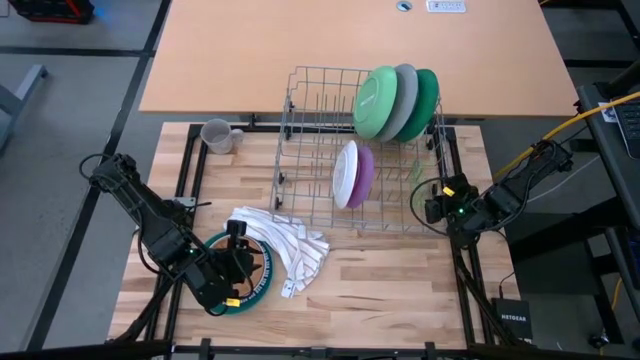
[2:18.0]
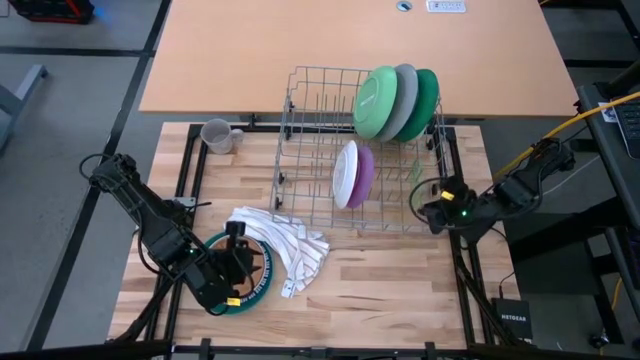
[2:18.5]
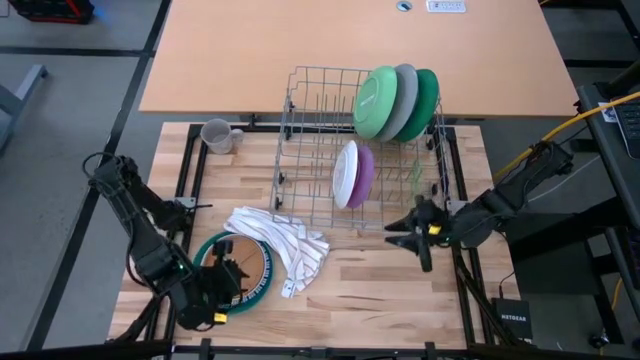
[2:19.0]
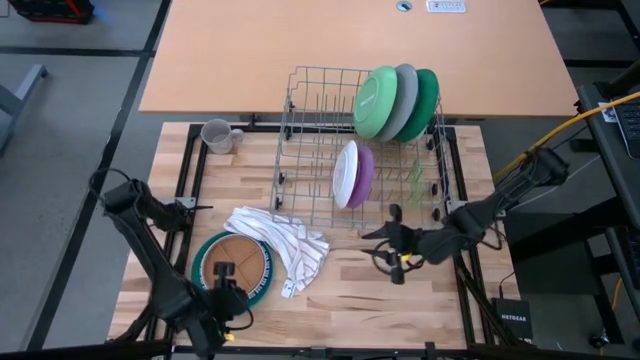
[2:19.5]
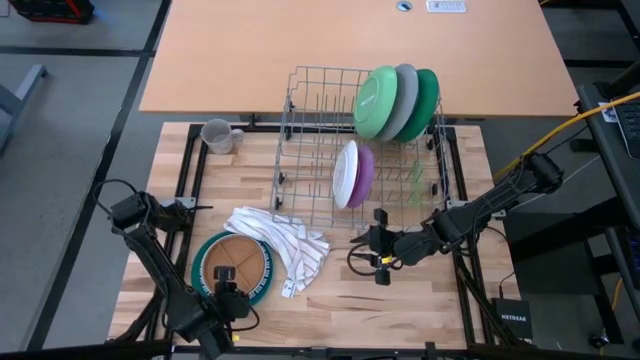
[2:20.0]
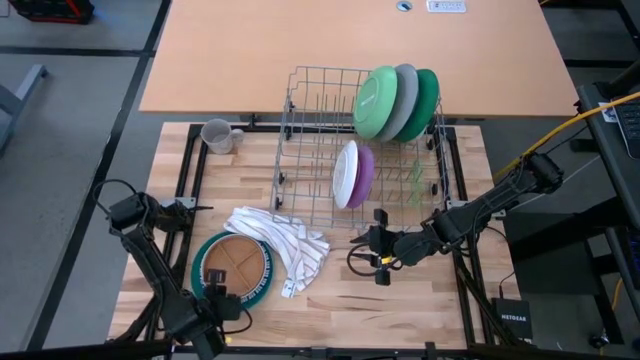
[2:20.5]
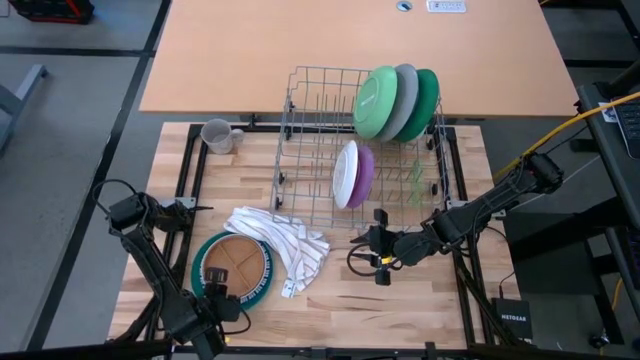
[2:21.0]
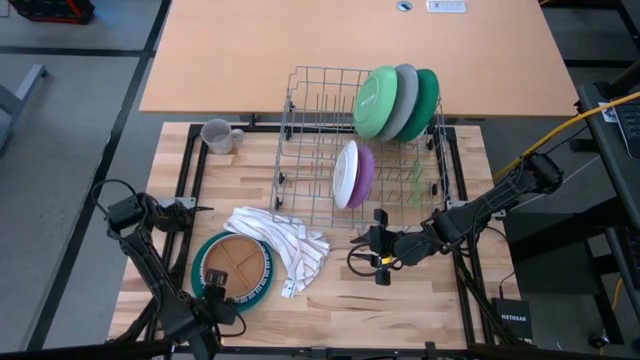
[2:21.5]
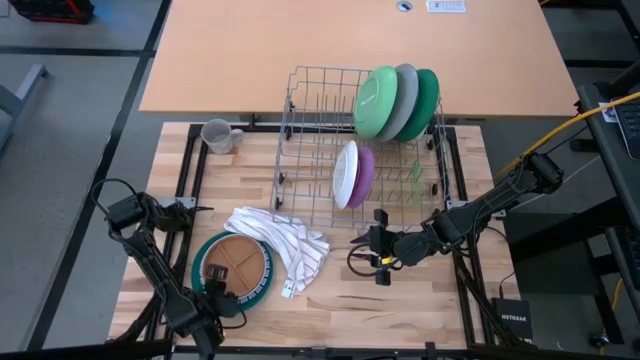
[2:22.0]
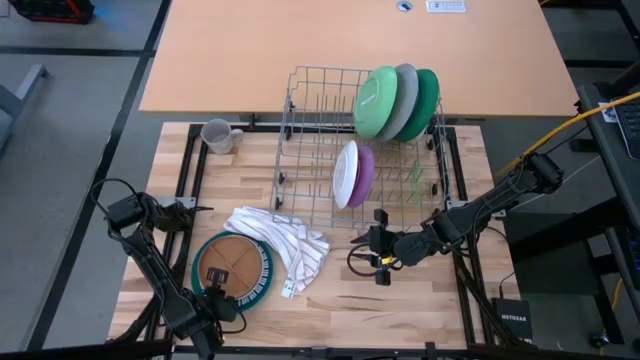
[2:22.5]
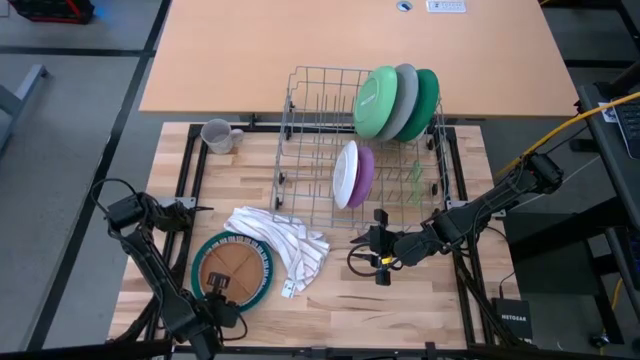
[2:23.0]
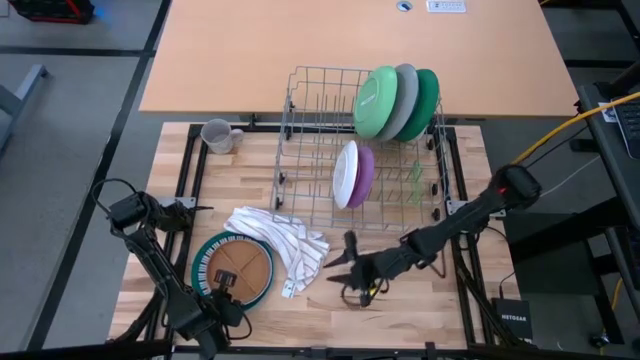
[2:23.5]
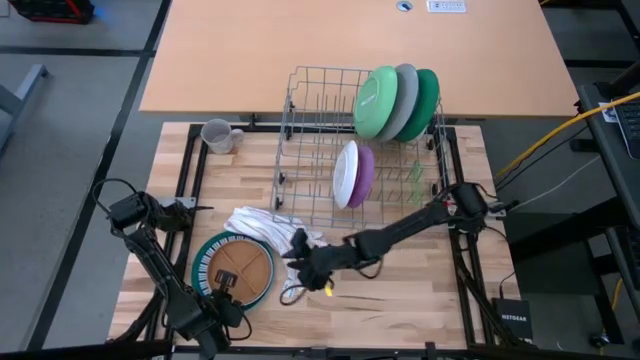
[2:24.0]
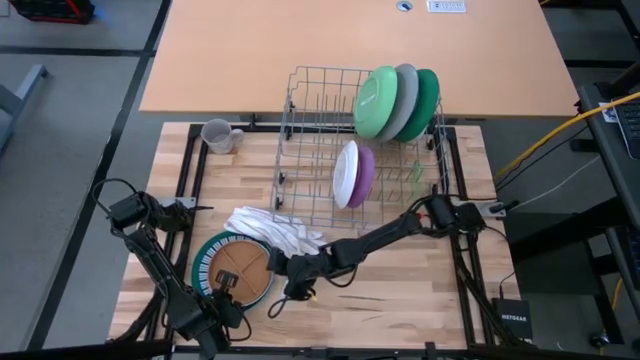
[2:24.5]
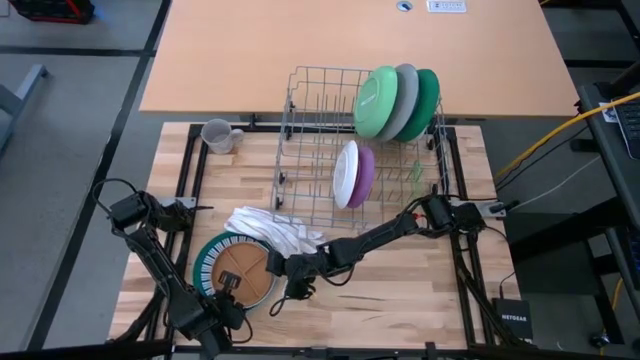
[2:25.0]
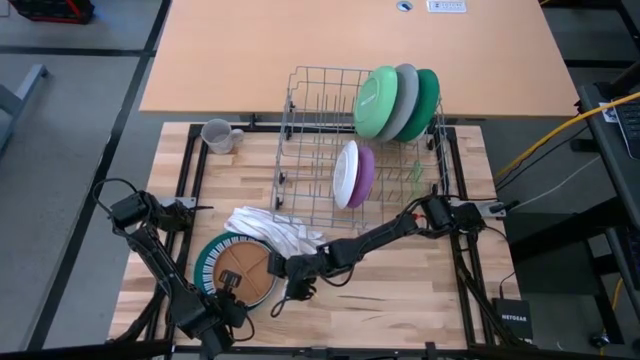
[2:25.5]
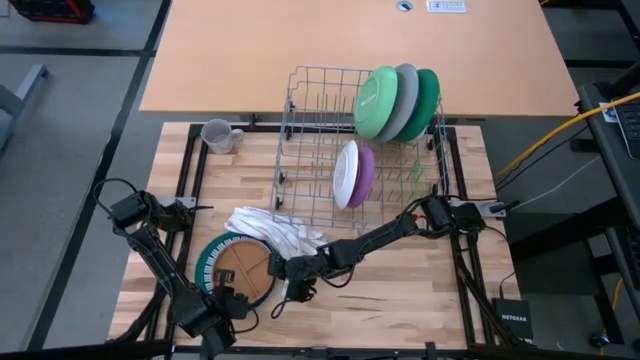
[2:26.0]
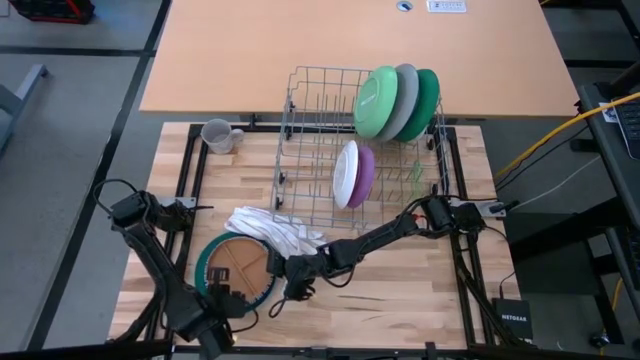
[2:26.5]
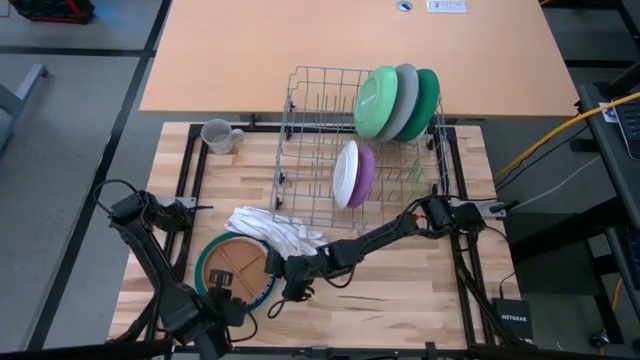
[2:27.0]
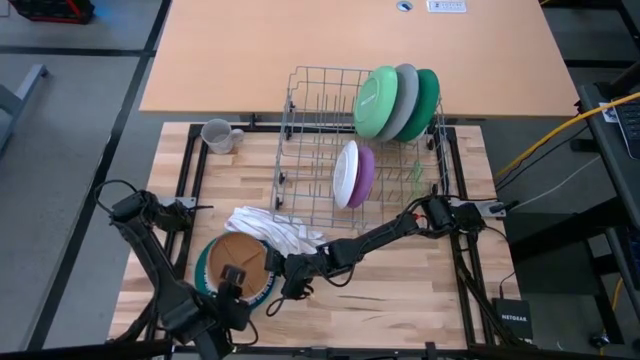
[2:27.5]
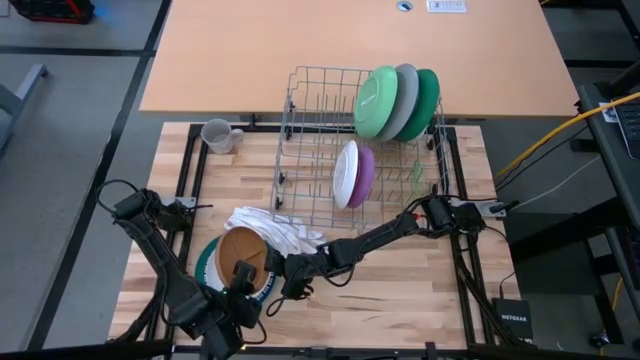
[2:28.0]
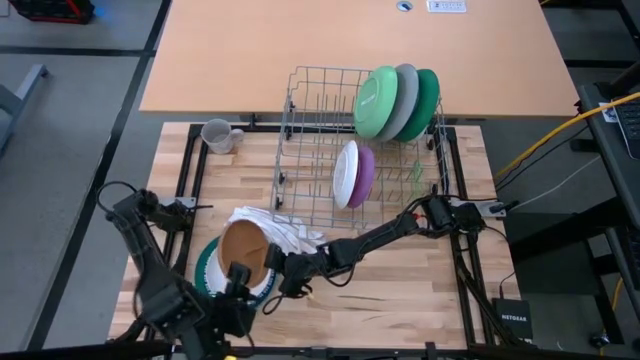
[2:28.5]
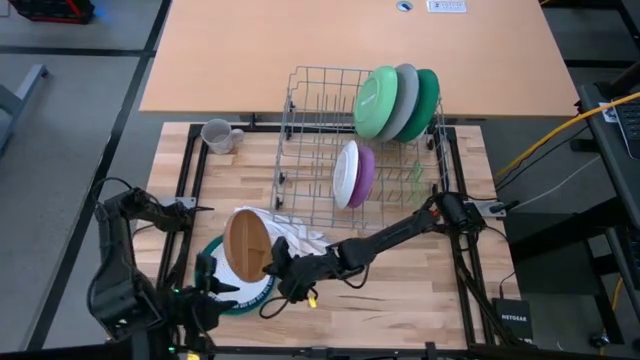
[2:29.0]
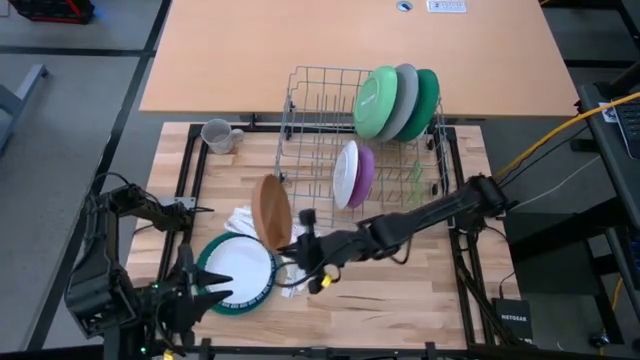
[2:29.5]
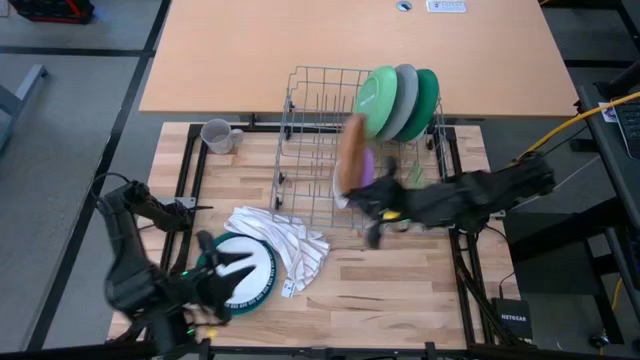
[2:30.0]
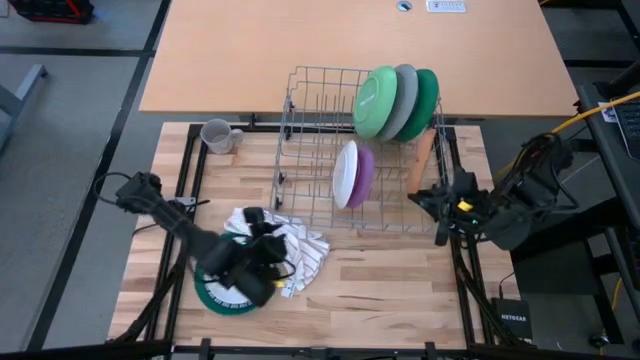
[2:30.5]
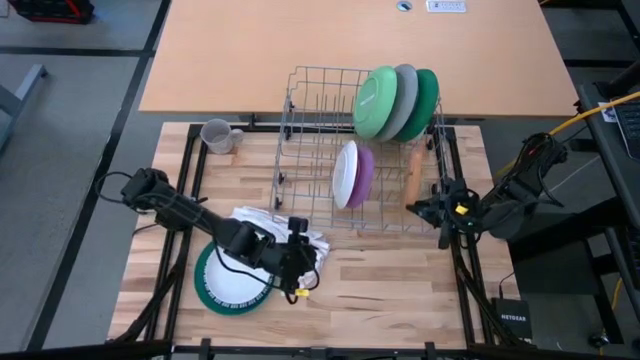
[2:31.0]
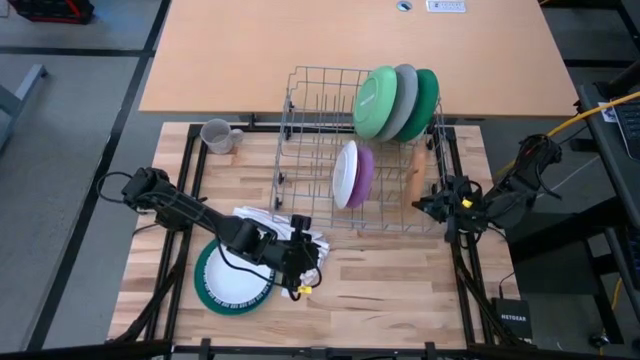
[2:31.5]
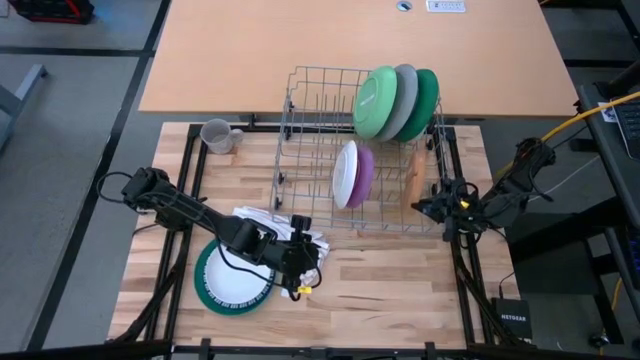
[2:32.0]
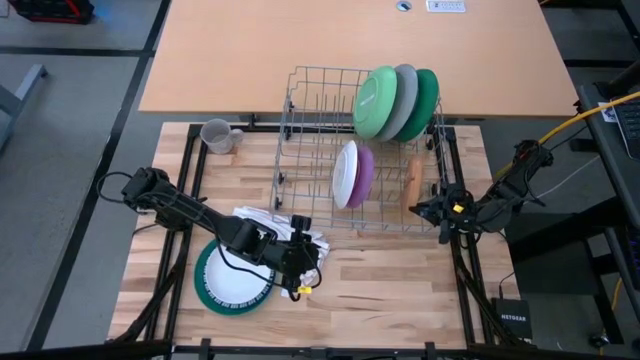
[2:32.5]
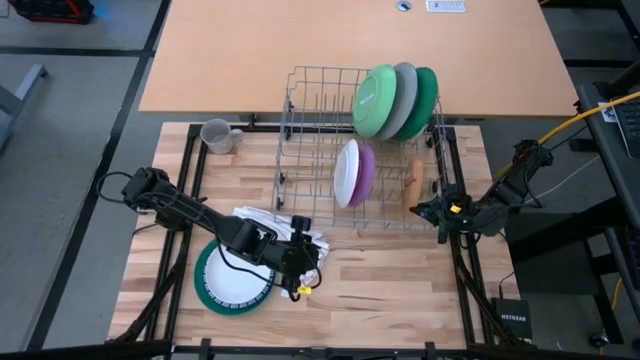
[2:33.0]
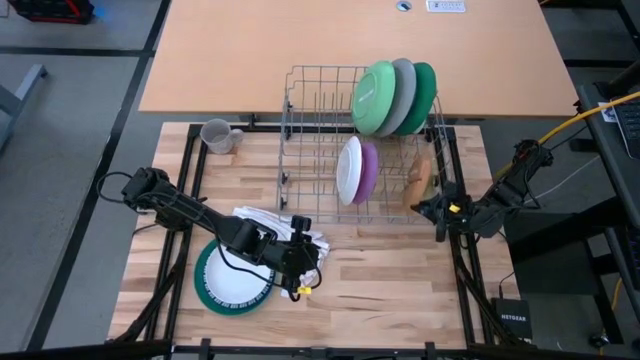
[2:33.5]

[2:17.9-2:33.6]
Task: Sort dishes
Put the brown plate into the dish rack

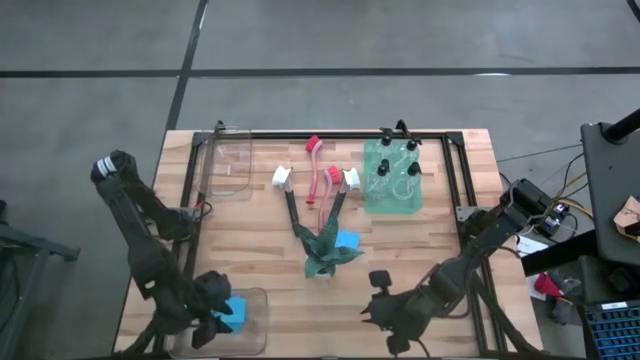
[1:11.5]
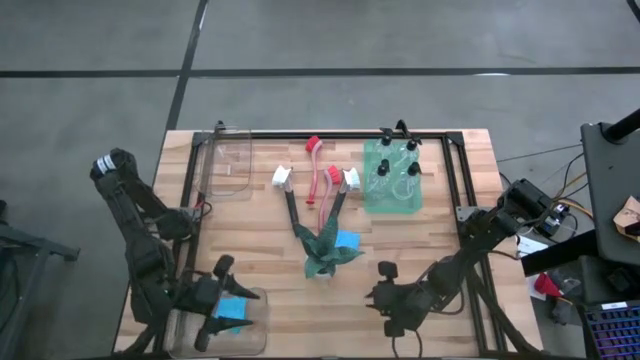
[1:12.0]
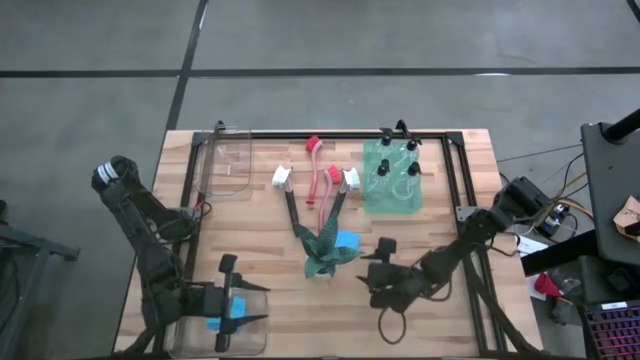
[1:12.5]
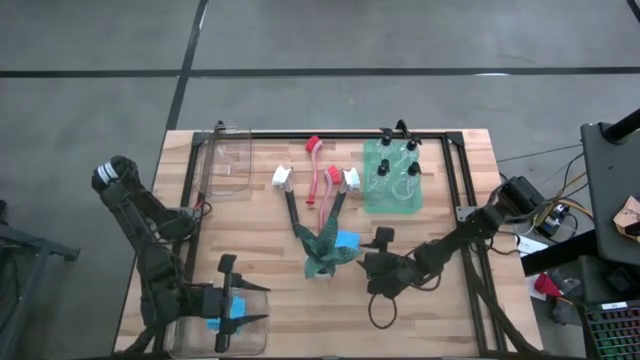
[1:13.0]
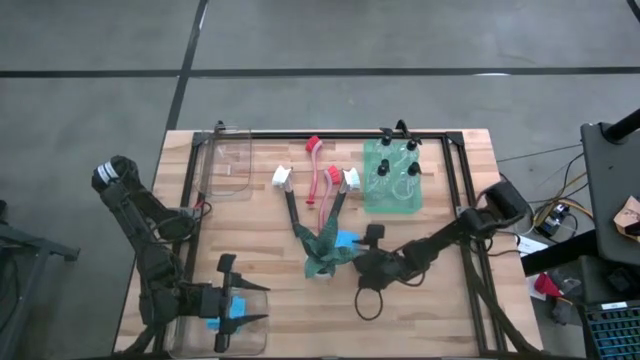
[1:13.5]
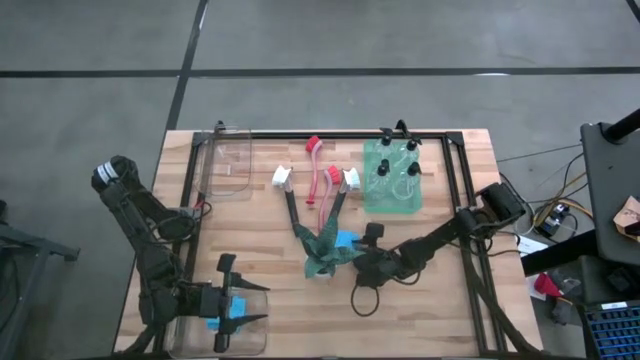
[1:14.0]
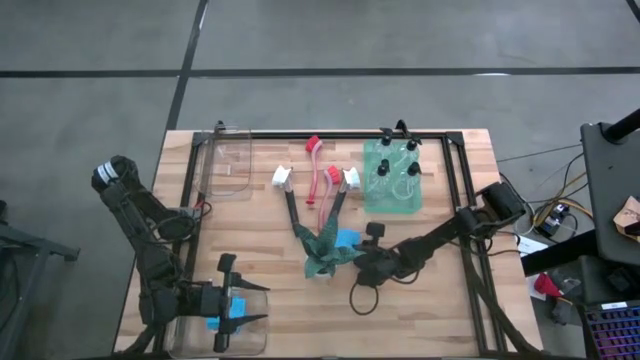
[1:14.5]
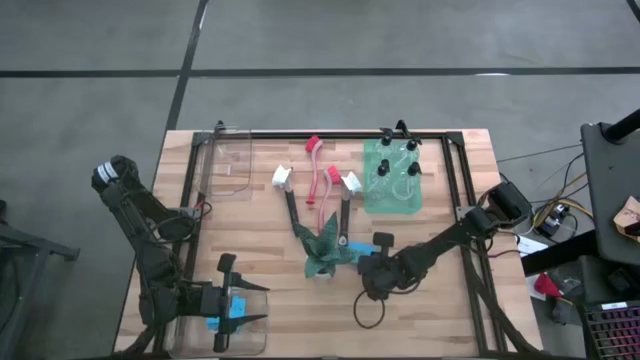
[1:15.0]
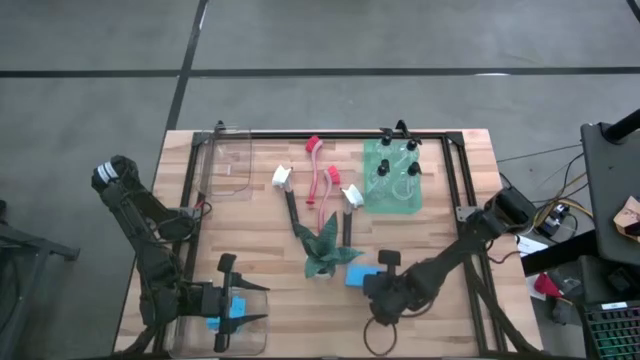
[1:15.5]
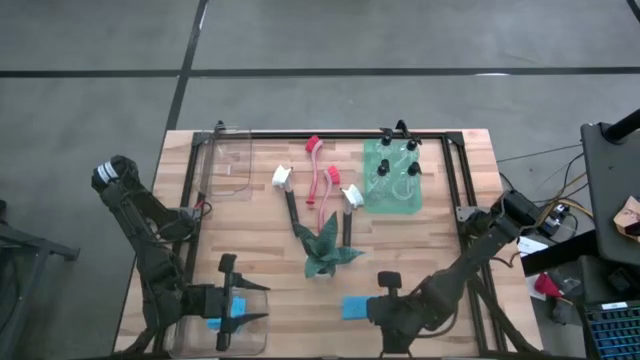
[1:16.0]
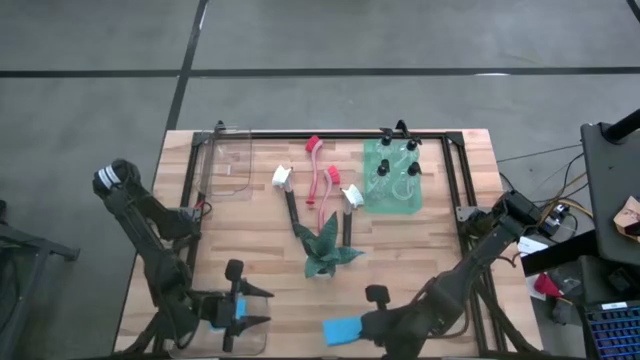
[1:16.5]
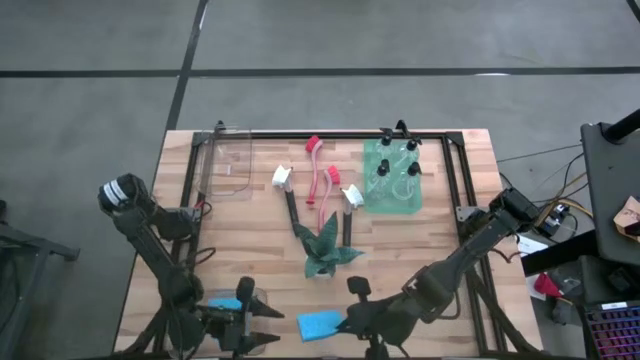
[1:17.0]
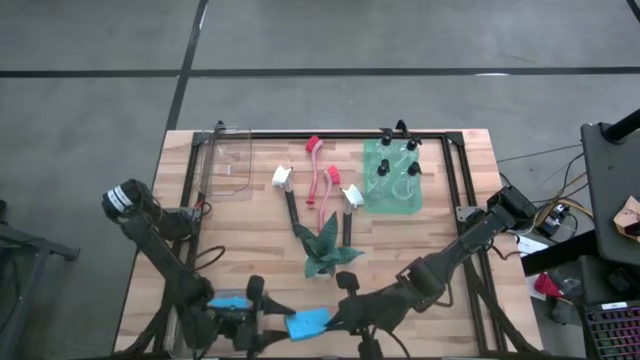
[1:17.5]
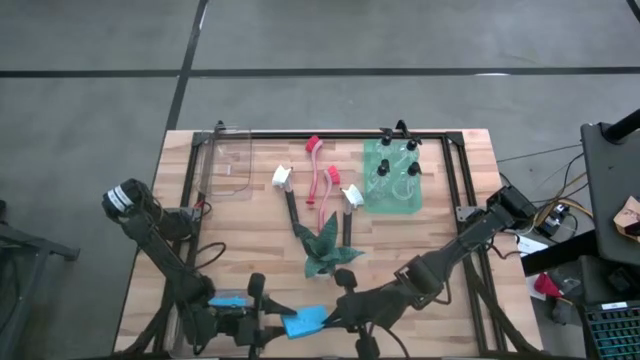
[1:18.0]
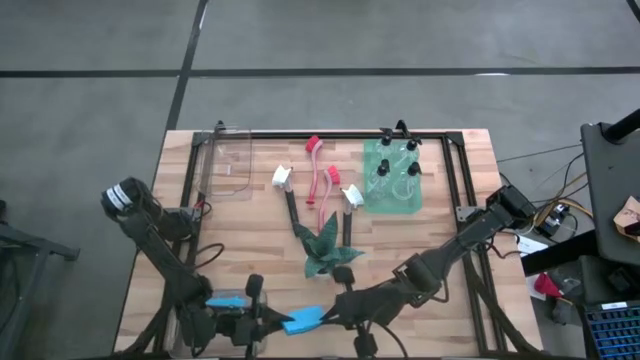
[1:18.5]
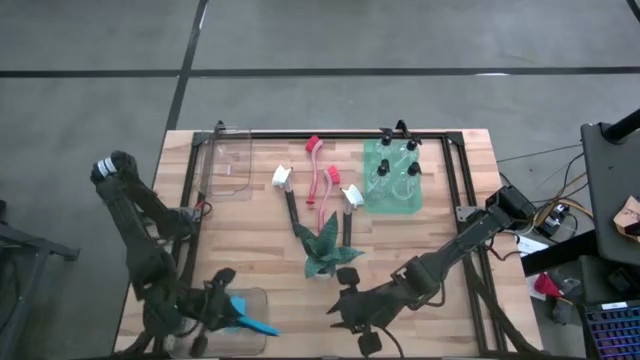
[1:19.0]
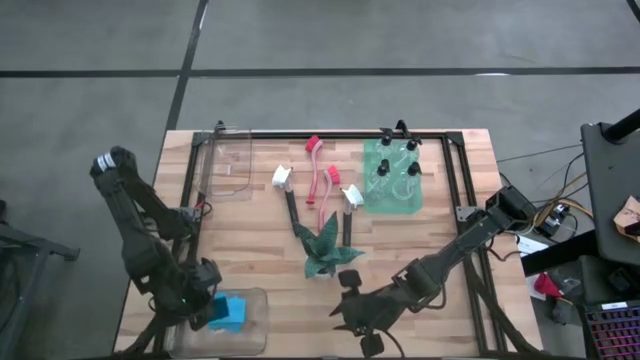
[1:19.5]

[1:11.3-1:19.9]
Task: Pick & Place Kitchen Sink Supplies
Put the blue sponge into the bottom transparent bin
